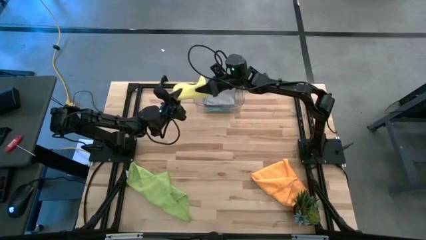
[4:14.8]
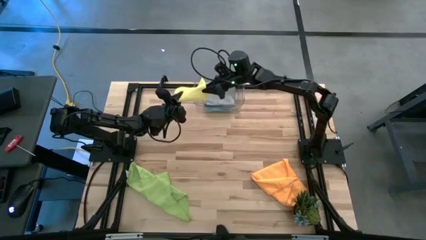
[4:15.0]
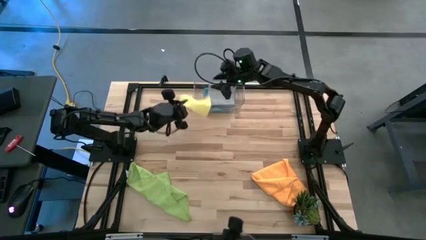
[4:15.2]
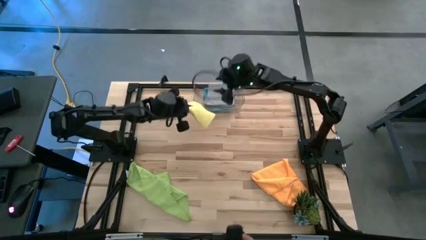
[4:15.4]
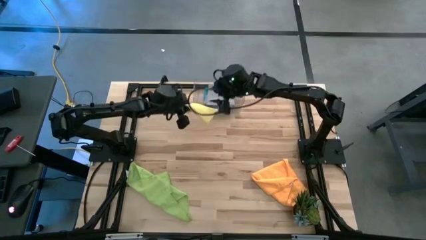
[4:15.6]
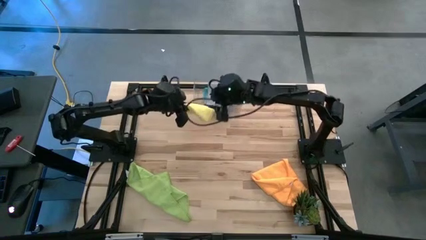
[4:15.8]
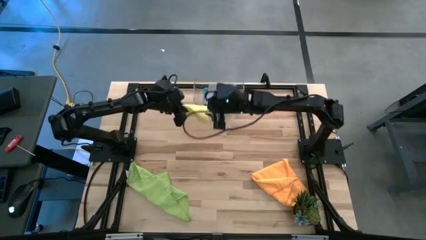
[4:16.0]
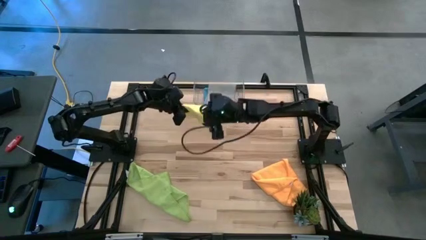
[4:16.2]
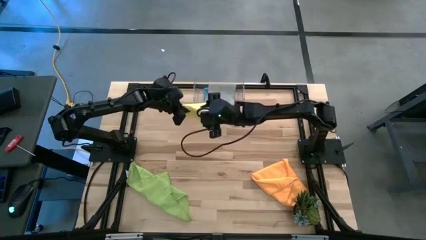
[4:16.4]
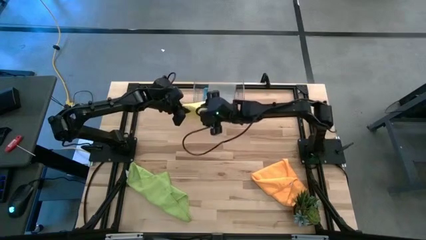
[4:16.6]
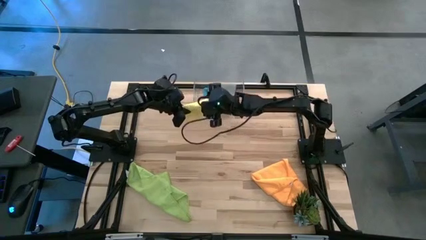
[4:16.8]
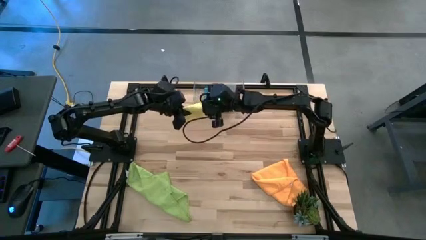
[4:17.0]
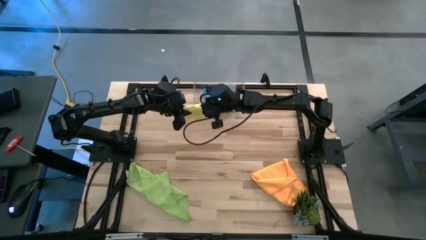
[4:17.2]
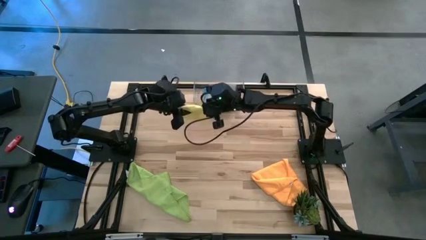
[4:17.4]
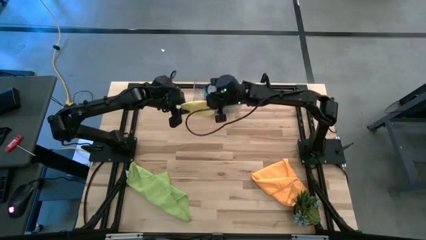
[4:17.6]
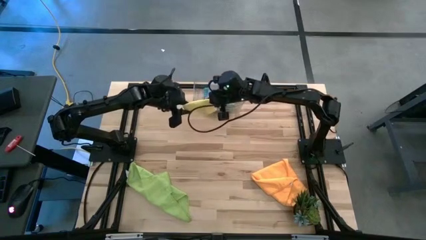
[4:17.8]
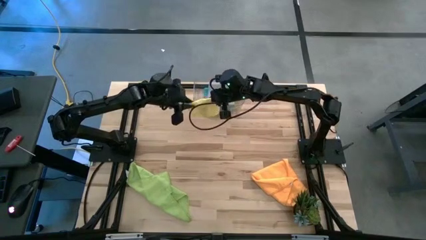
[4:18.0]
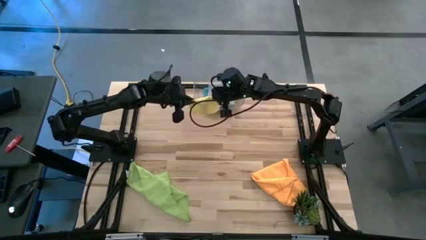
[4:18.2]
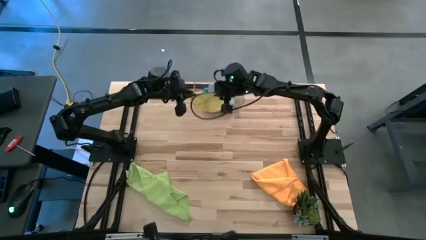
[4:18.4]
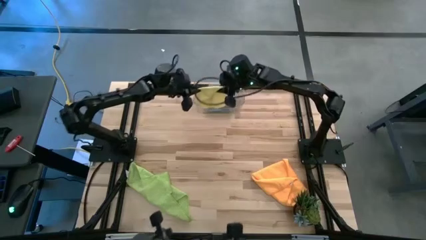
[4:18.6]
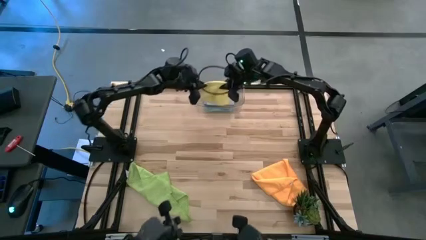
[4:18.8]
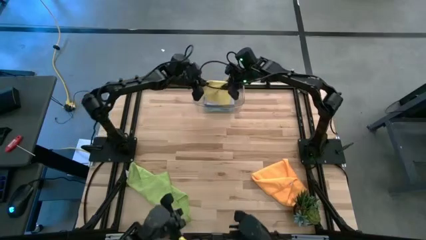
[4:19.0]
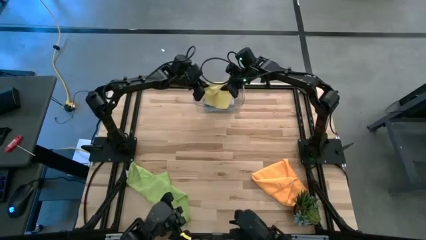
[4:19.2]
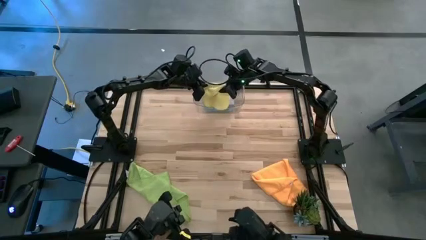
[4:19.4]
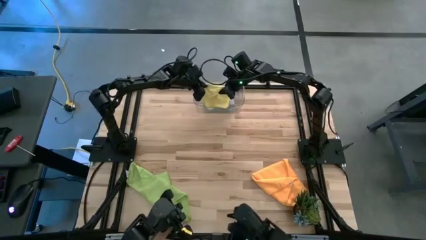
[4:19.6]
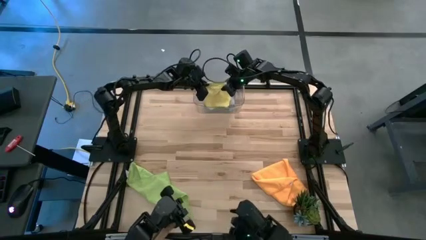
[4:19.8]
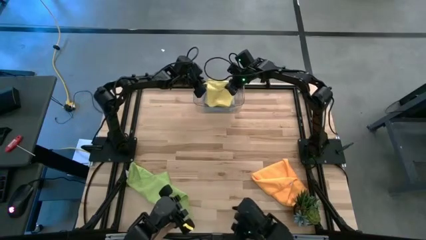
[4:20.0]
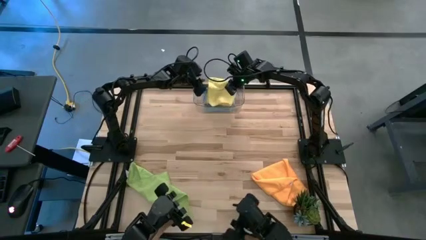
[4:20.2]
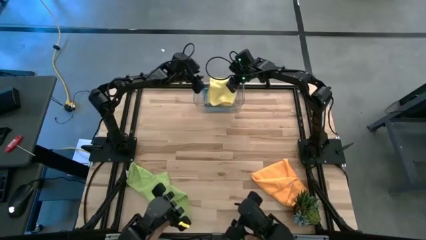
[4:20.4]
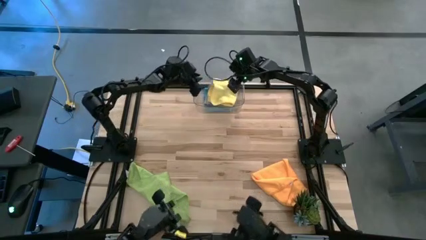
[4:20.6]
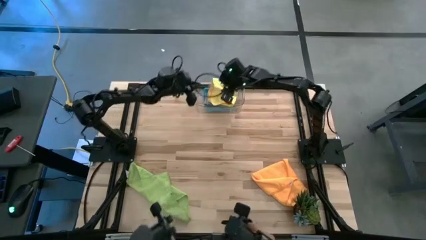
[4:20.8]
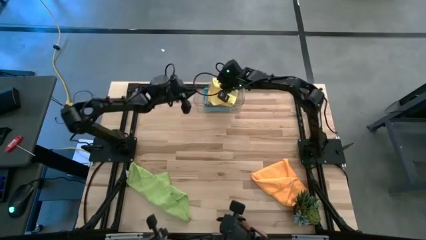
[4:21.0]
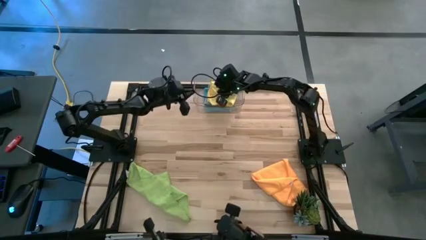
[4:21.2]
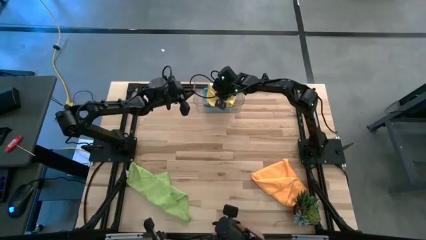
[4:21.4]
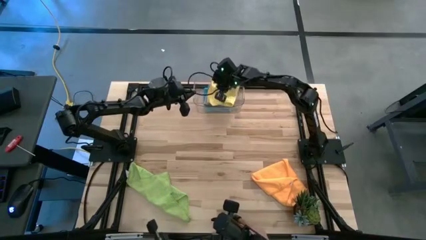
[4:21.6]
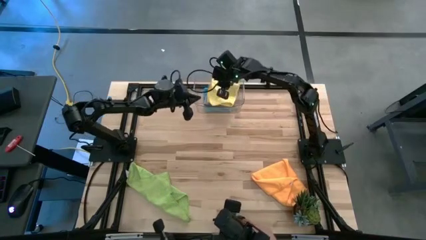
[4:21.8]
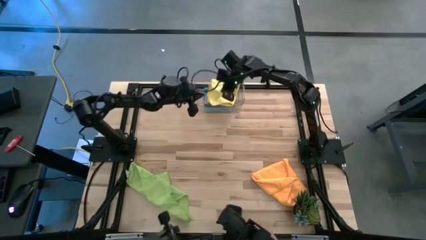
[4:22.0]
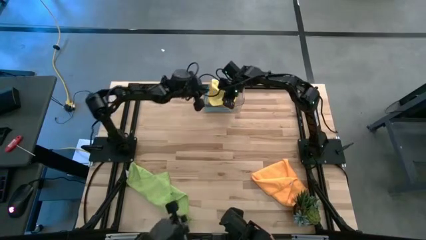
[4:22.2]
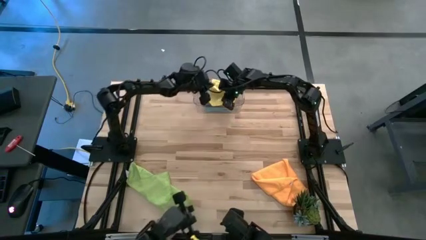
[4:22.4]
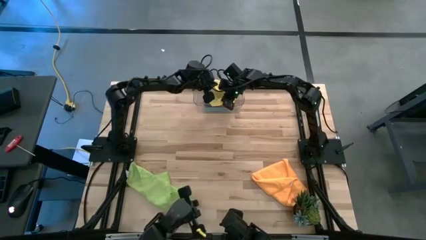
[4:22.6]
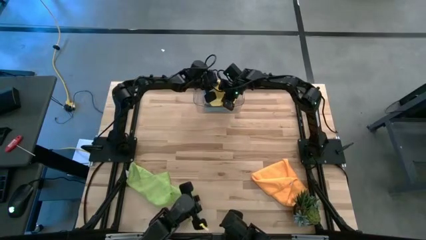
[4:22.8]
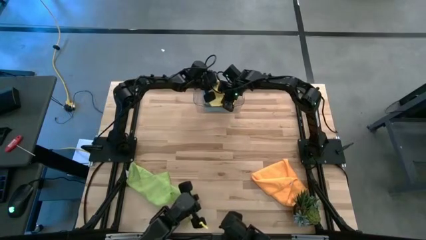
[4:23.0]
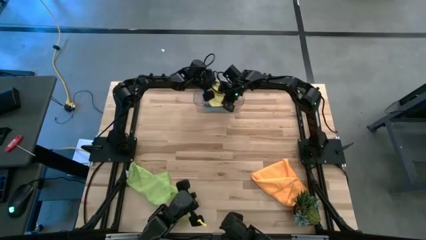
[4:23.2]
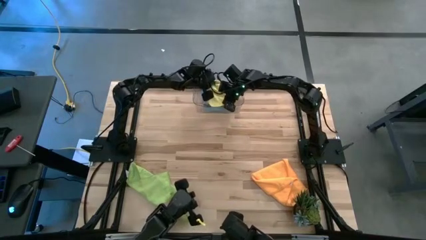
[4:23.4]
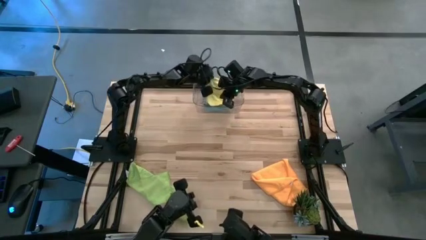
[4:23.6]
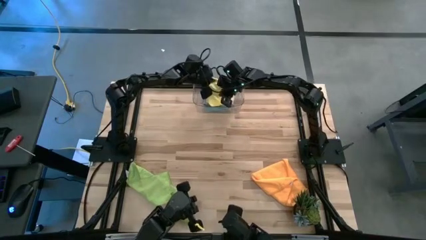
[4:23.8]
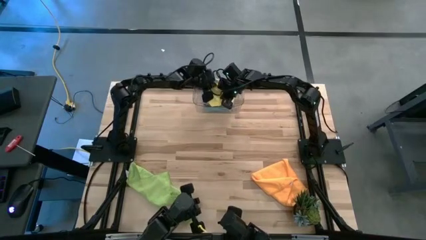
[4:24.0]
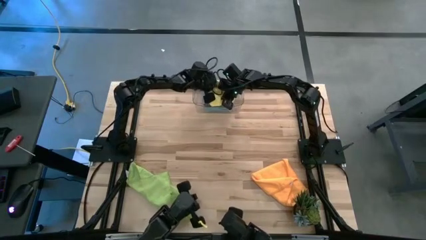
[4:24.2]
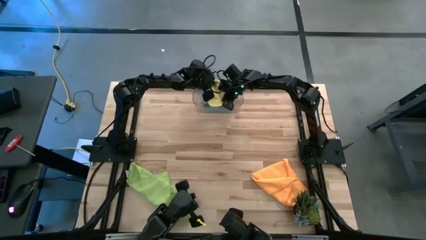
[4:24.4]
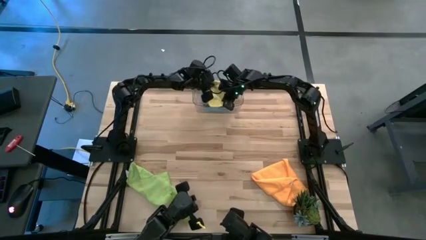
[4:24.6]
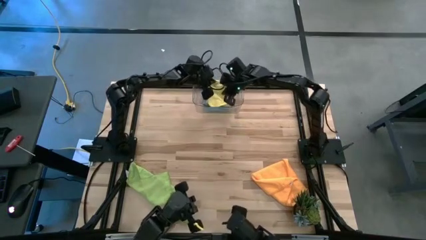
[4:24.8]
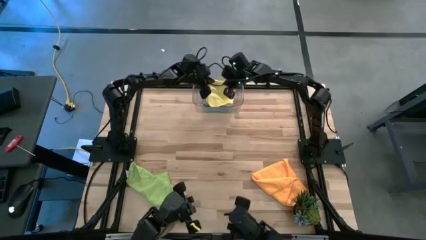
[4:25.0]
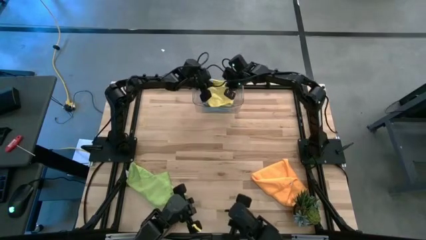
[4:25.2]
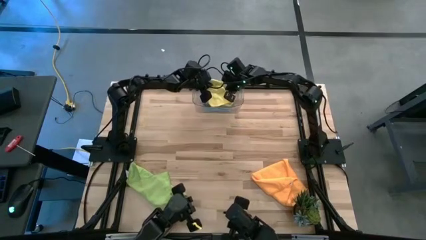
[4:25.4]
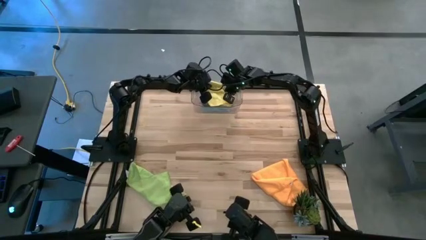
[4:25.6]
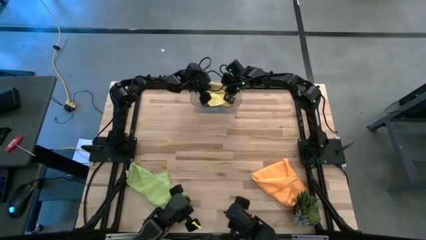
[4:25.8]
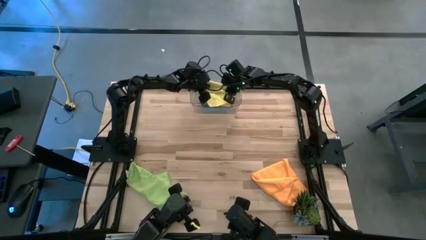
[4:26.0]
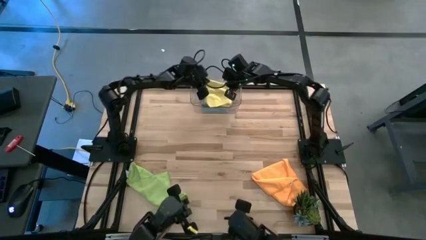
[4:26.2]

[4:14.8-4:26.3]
Task: Fold microfiber towels
Put the yellow towel into the transparent bin

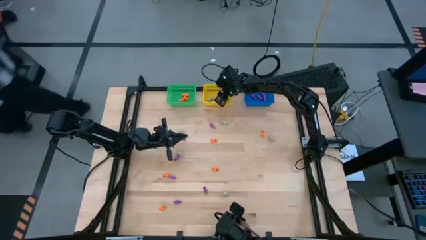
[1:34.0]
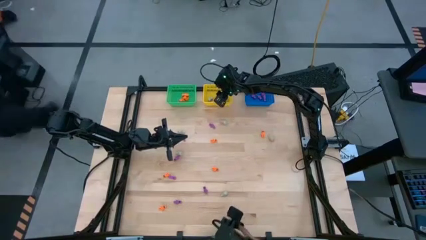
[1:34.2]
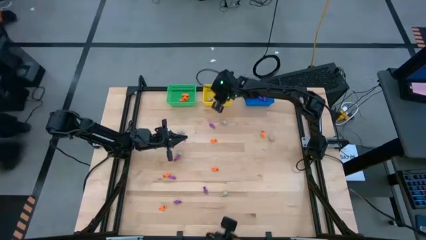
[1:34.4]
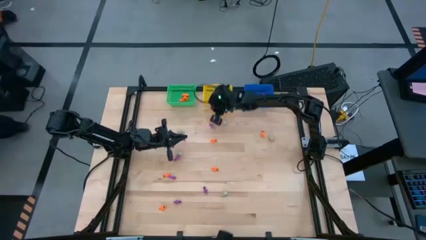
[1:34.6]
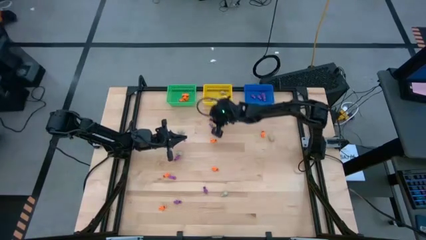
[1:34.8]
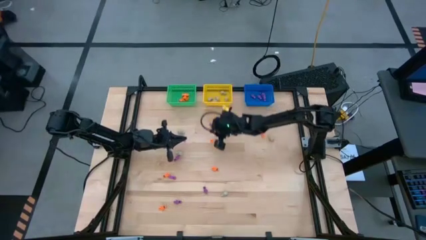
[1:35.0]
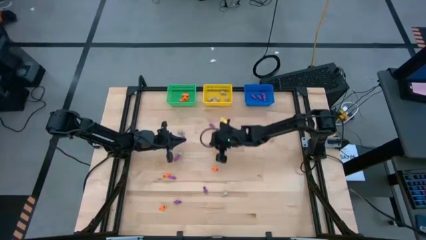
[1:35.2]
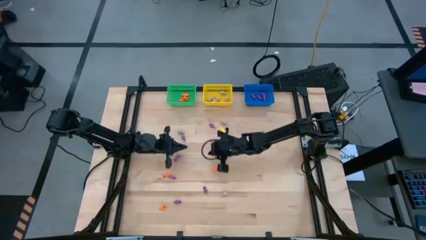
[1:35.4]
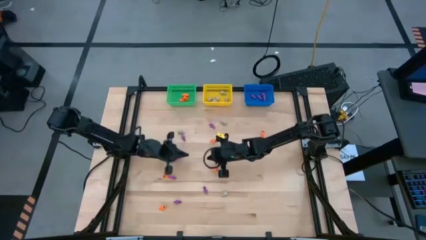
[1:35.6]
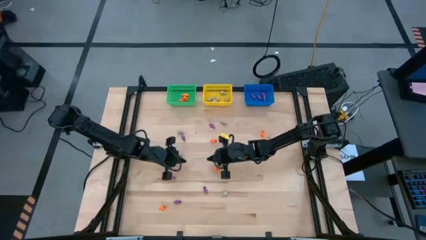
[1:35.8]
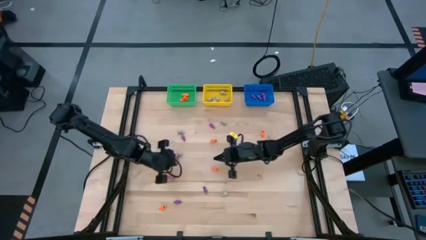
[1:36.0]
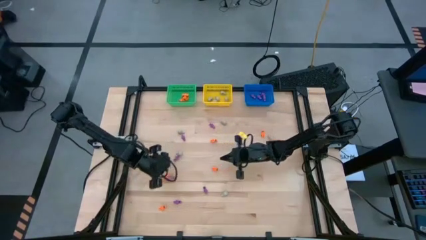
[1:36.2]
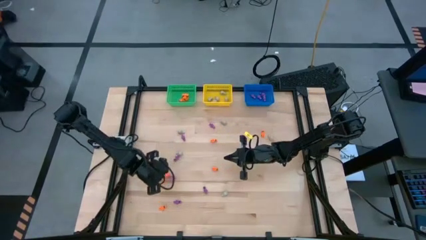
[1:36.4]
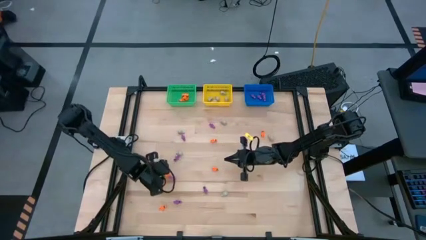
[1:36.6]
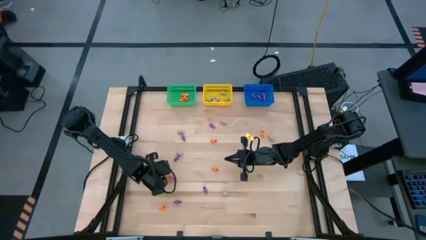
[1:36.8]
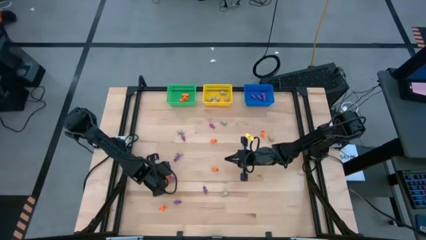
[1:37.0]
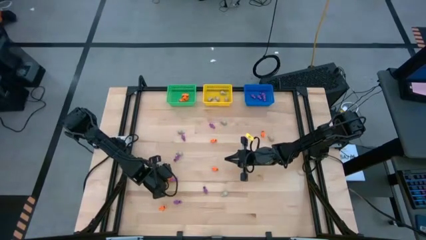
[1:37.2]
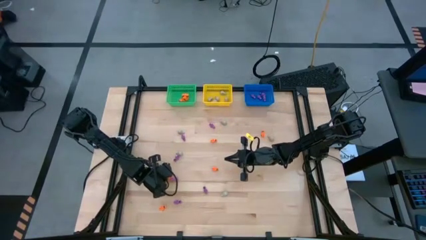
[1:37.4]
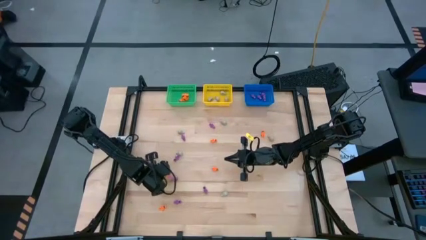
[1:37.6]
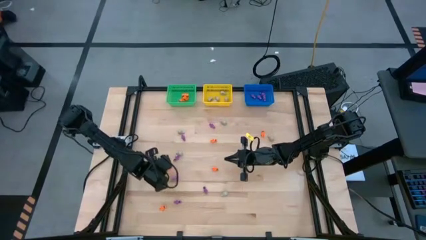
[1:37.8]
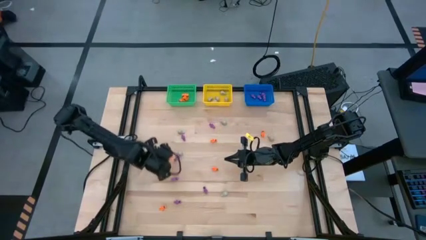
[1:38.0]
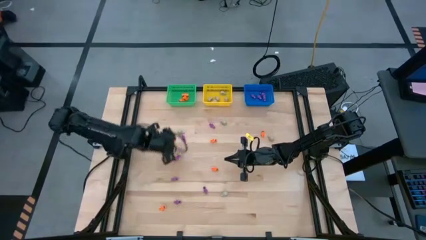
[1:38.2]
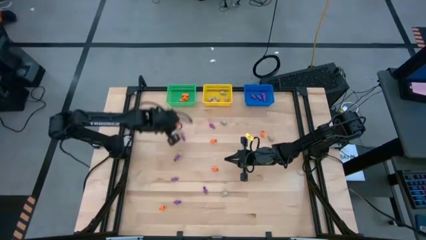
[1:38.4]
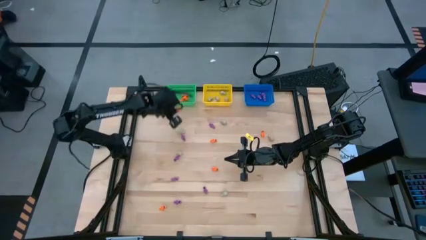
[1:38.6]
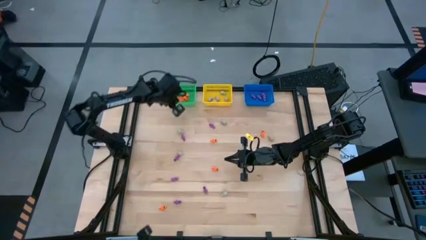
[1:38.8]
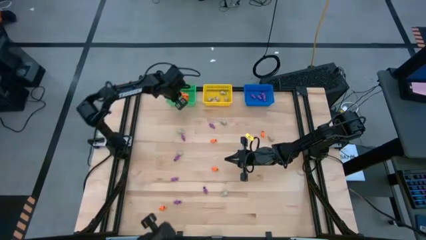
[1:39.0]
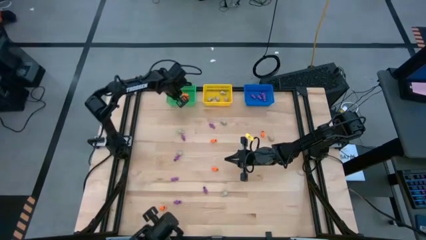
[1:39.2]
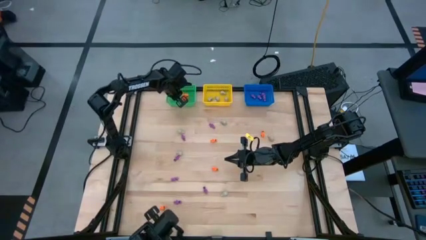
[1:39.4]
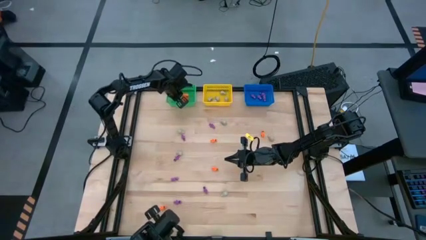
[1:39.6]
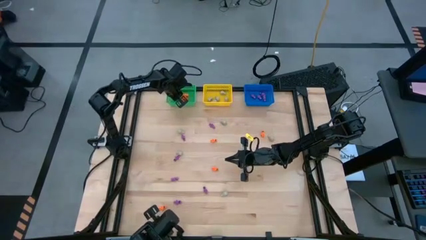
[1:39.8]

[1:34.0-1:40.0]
Task: Sort Halloween decoration
Put the orange skeleton toy into the green bin
